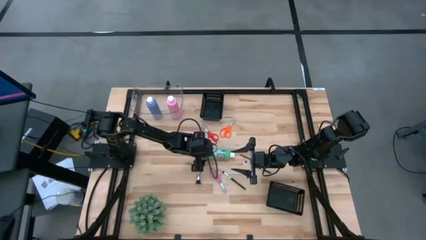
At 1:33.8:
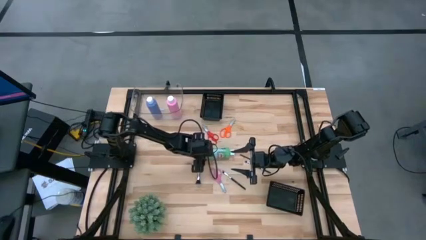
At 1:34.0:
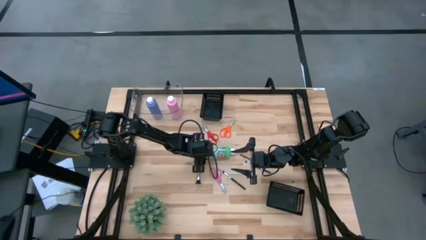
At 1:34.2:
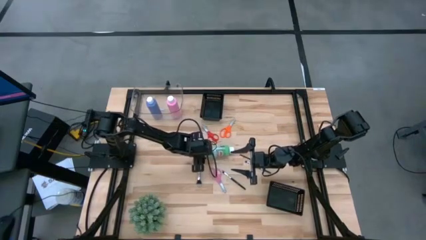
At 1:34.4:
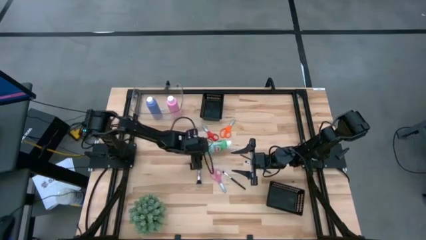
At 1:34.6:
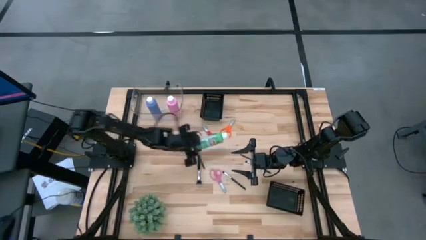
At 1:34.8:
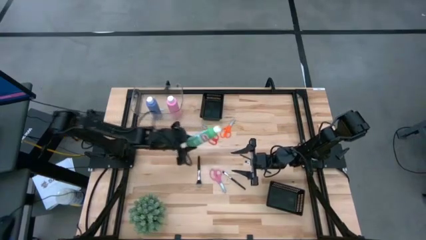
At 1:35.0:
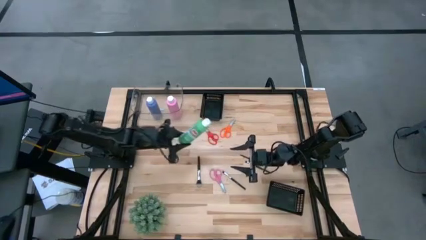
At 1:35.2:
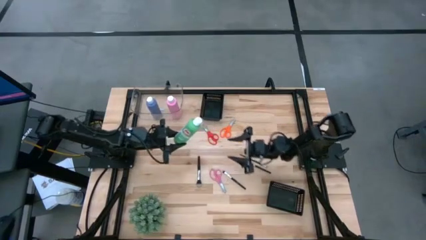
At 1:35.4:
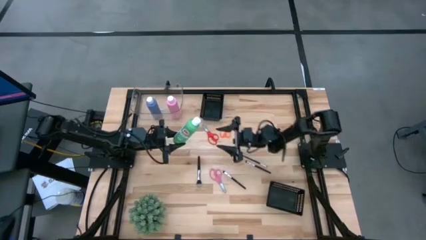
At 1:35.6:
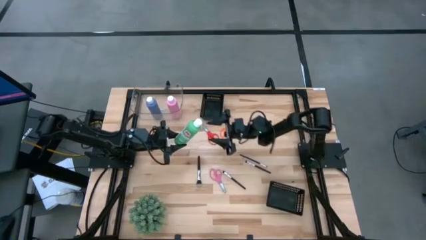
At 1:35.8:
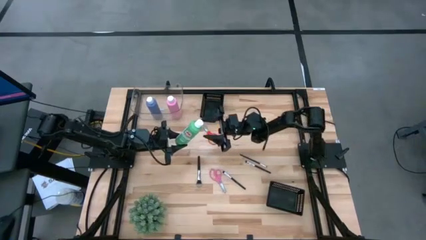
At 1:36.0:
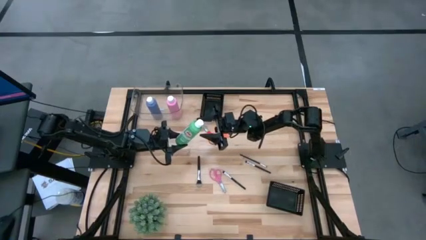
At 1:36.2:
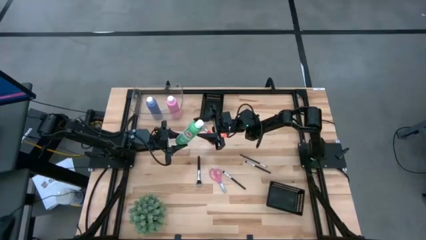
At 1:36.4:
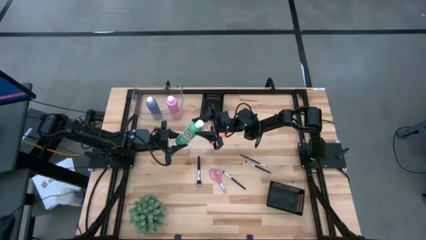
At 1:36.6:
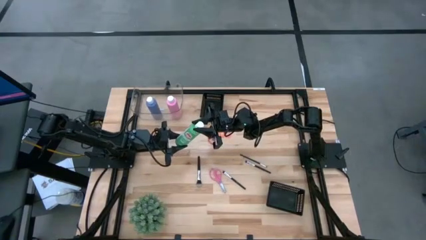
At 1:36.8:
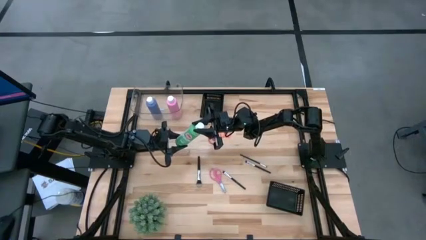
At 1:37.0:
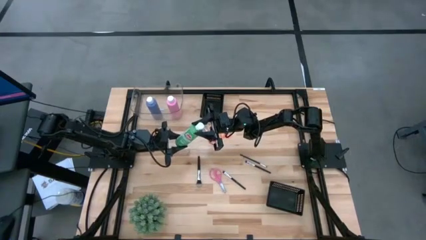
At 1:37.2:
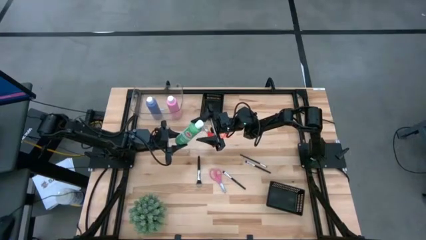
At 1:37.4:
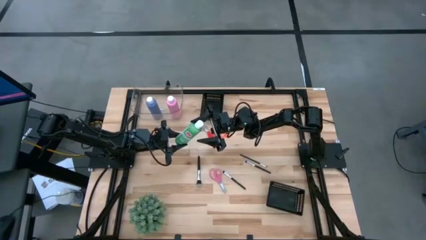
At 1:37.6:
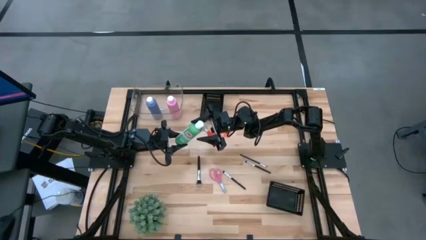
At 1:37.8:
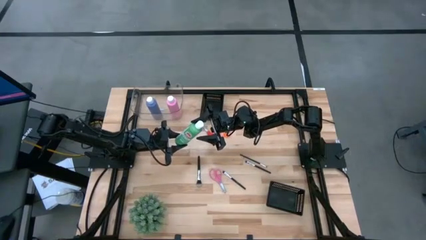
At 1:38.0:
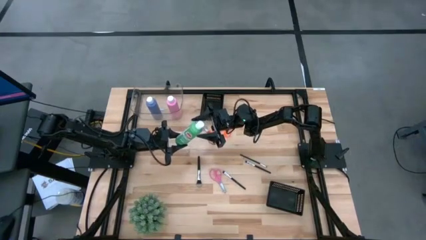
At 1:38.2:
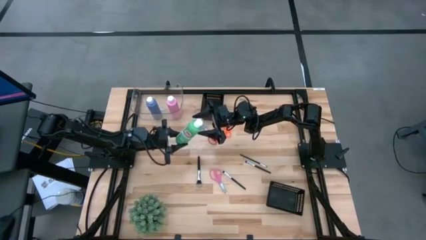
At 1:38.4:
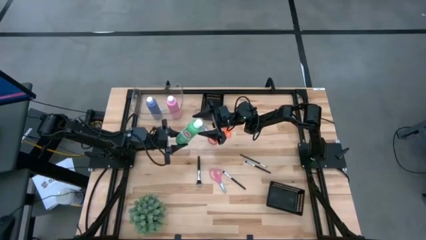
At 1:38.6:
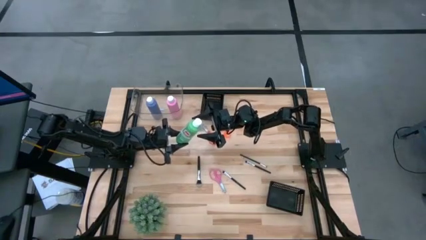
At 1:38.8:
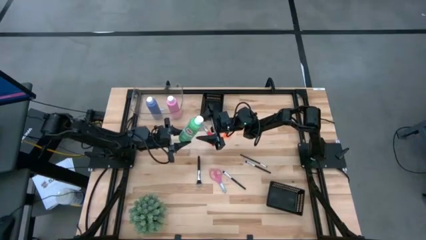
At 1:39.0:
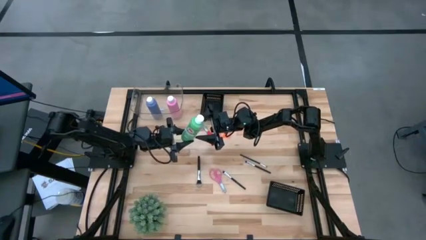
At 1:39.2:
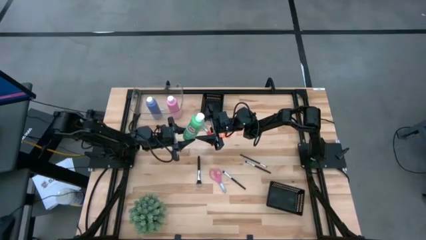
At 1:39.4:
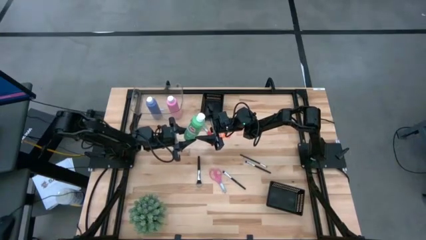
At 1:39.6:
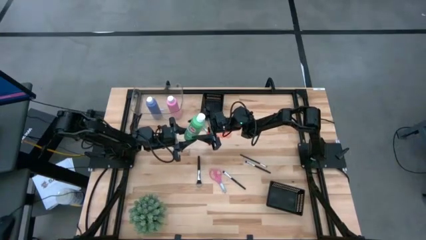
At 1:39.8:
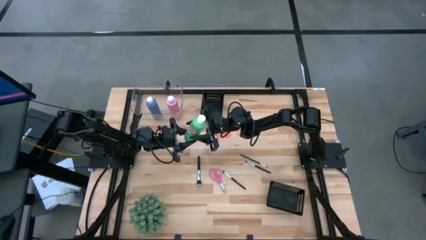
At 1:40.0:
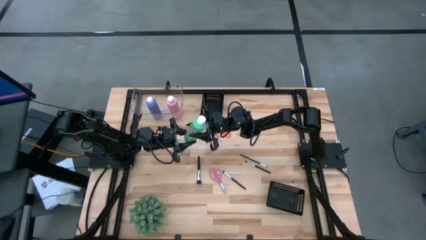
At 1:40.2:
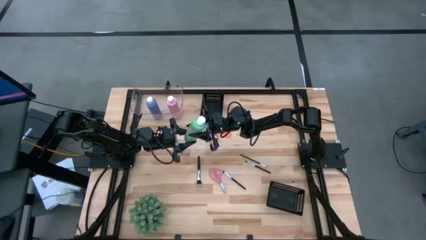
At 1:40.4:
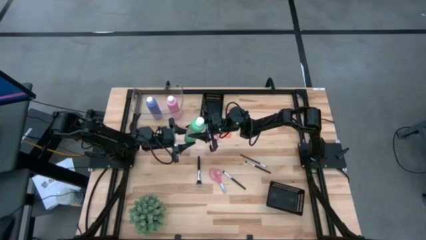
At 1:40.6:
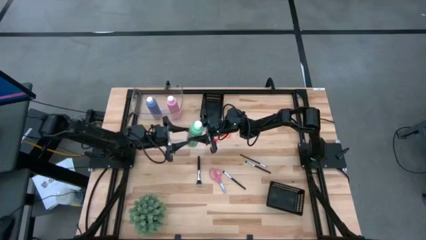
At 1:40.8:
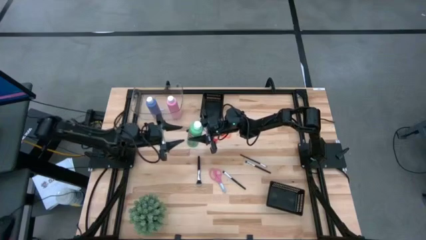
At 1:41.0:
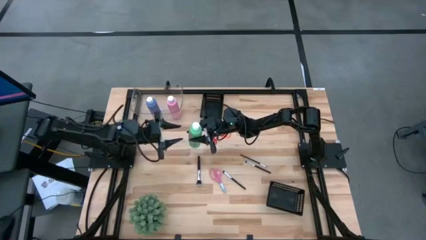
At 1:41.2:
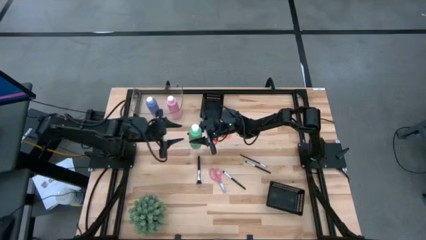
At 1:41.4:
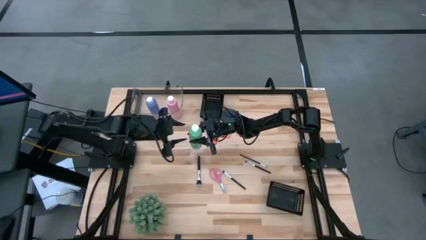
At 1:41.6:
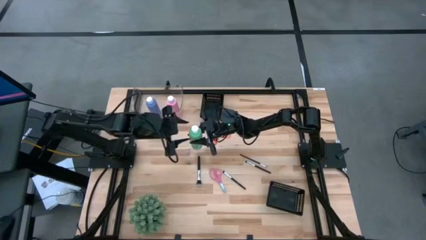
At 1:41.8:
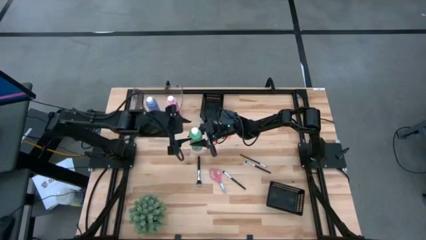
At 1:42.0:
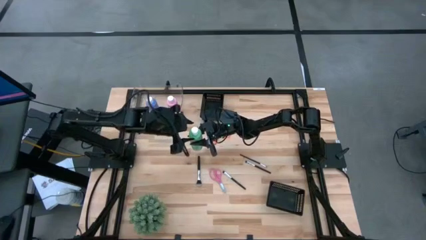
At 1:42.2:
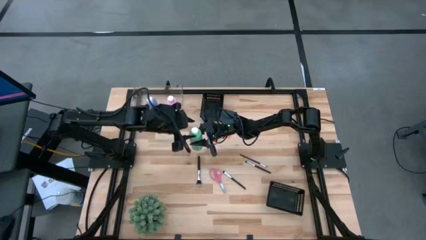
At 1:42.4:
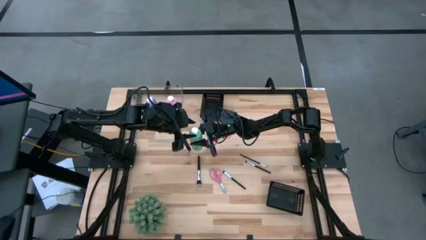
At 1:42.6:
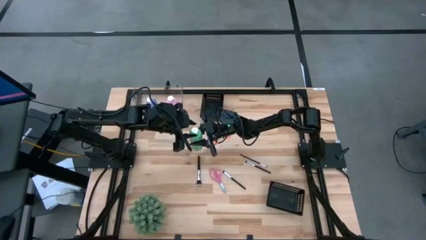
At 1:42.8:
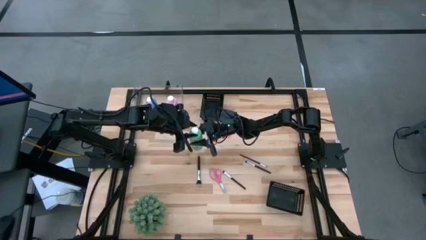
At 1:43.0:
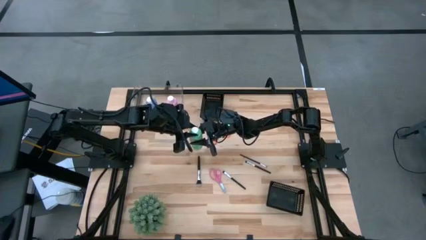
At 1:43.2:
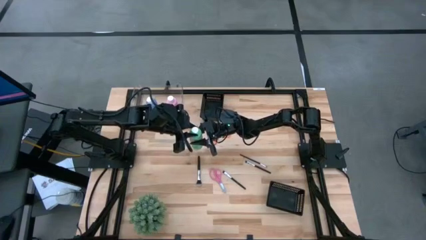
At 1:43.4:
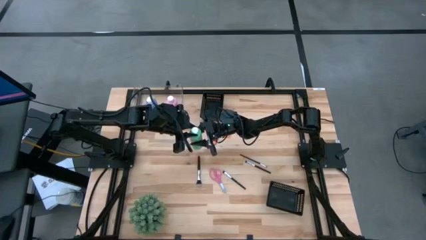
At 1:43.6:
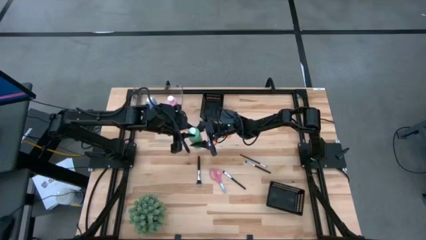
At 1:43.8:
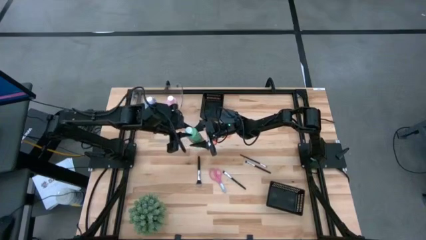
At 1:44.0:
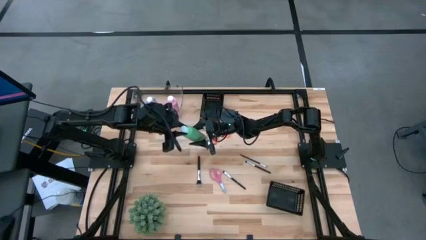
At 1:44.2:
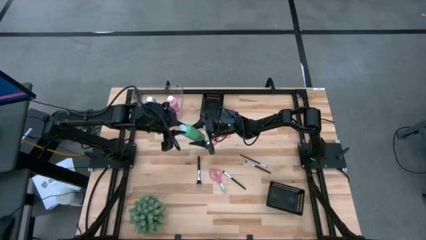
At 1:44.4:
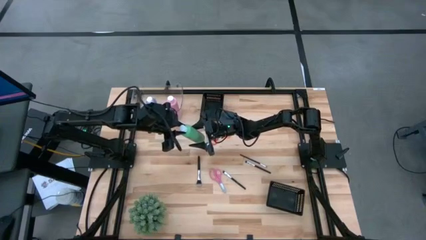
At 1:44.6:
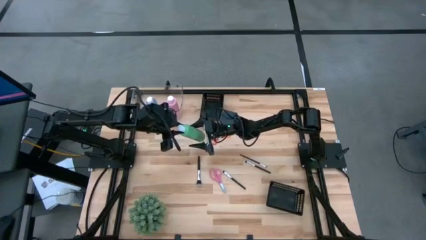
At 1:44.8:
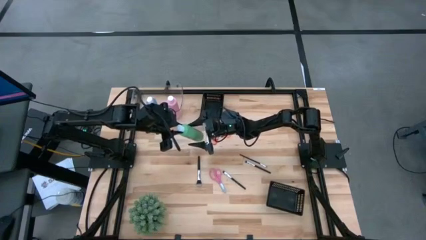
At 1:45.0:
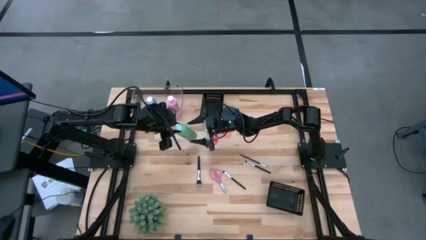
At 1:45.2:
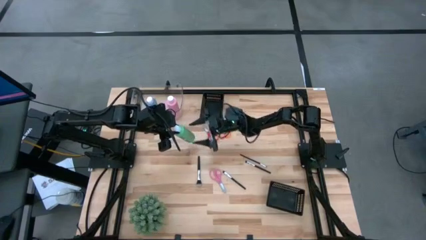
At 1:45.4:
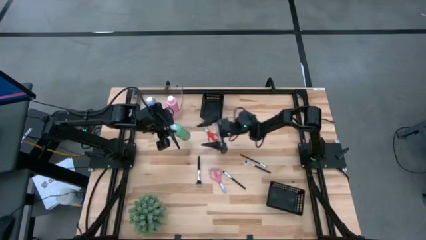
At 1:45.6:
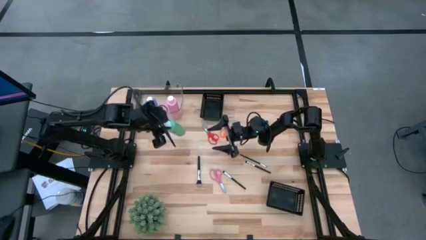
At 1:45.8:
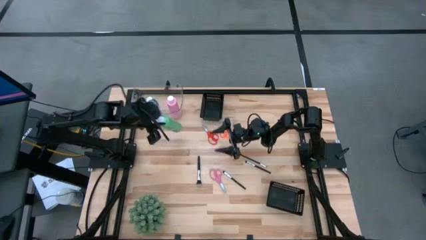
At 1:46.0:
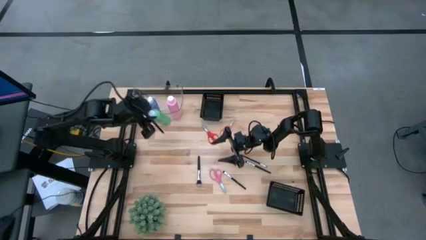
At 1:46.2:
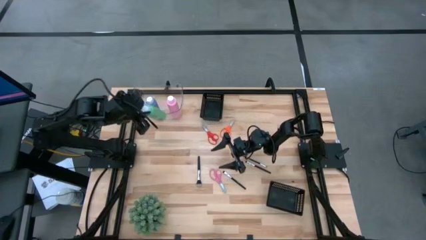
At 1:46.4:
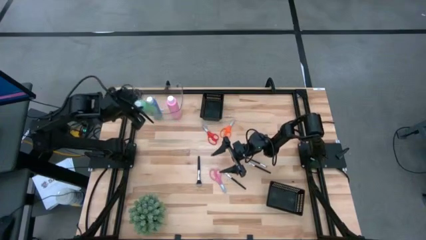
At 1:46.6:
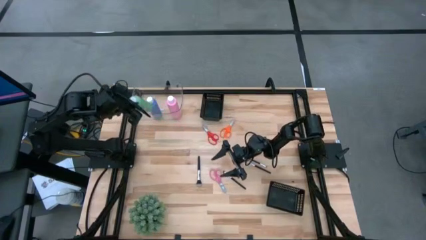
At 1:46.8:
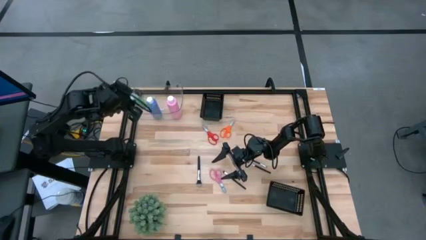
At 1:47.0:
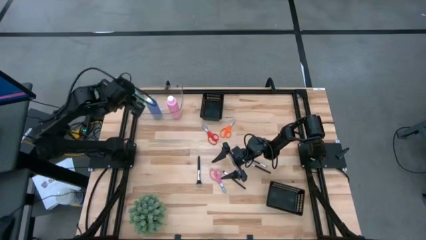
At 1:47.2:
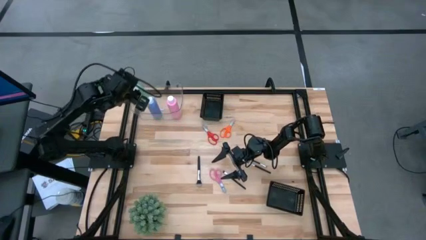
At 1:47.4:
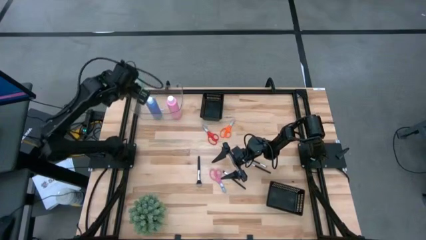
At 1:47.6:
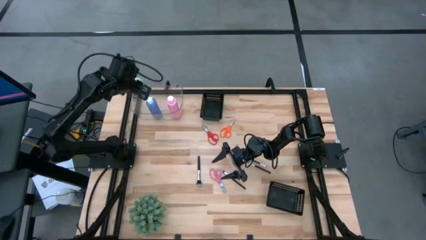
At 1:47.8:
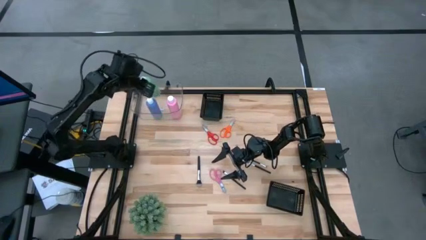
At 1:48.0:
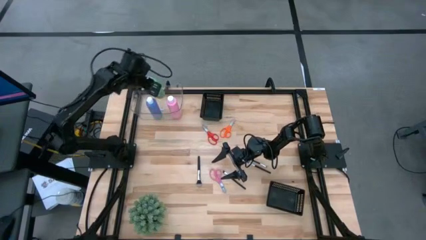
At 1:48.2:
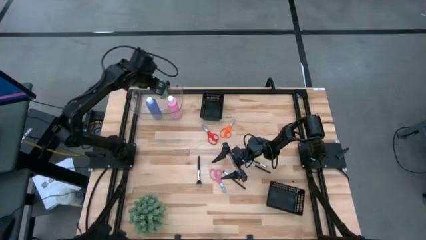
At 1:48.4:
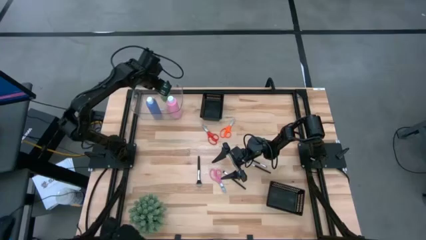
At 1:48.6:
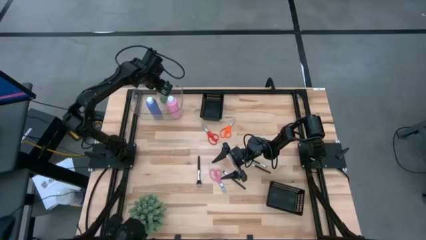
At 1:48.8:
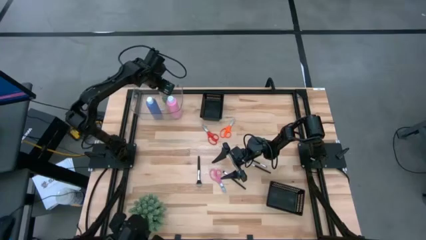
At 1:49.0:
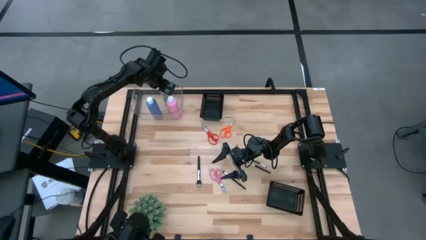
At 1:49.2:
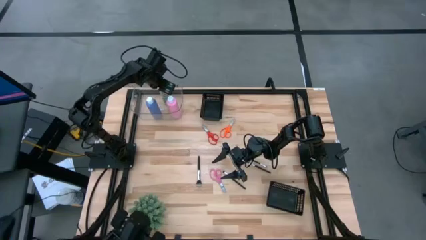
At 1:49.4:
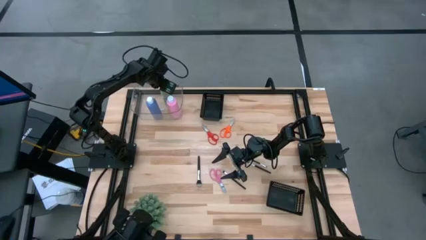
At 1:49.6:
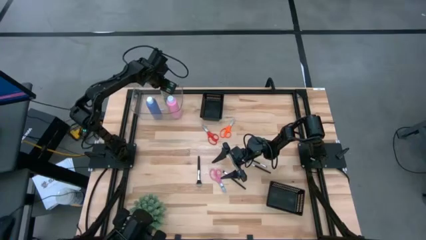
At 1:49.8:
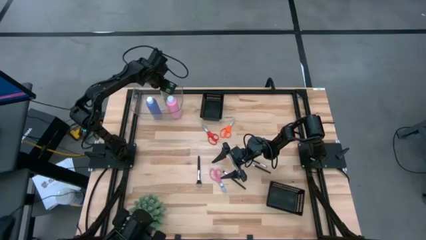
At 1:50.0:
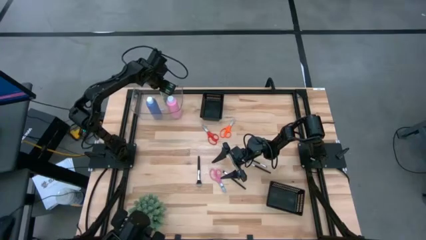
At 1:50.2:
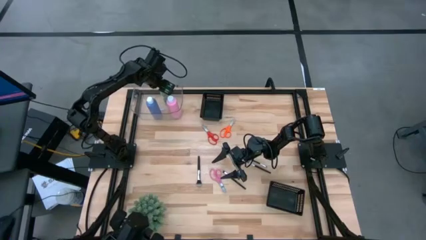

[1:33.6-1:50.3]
Task: Pick & Place Paint Supplies
Put the green paint bottle into the transparent bin
